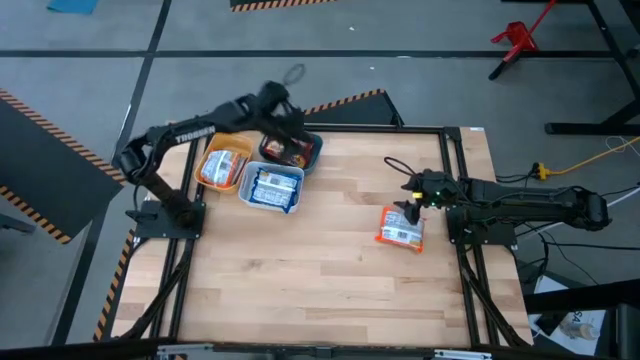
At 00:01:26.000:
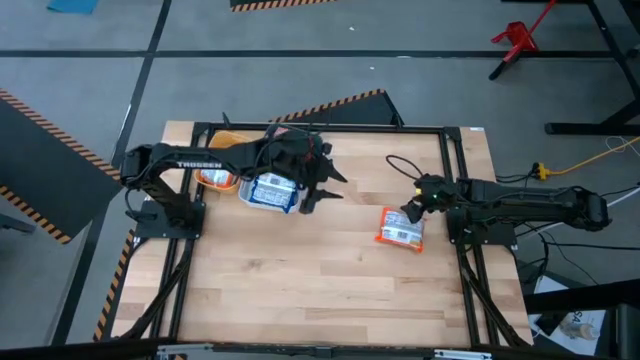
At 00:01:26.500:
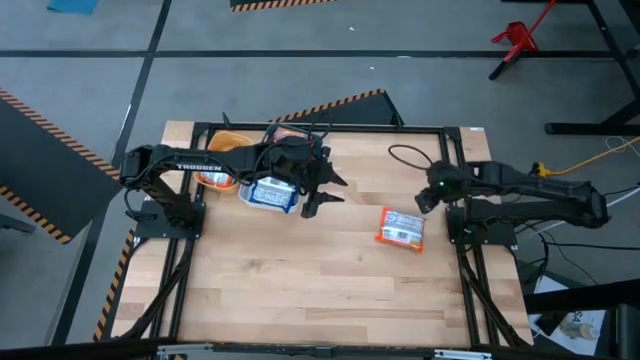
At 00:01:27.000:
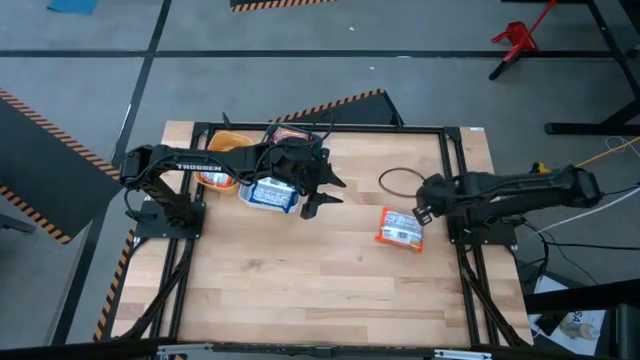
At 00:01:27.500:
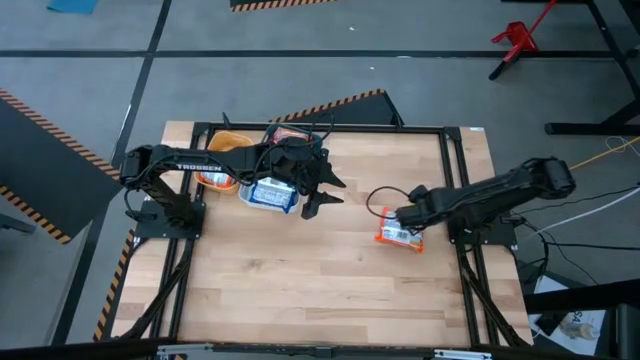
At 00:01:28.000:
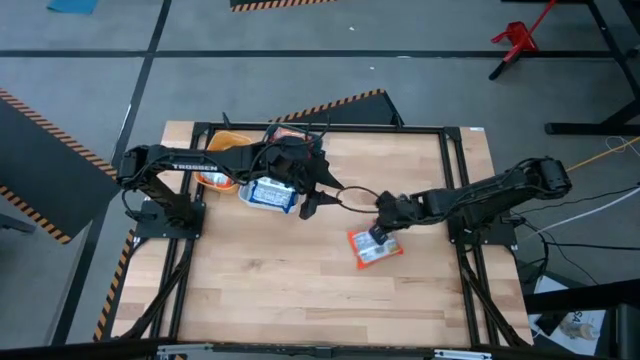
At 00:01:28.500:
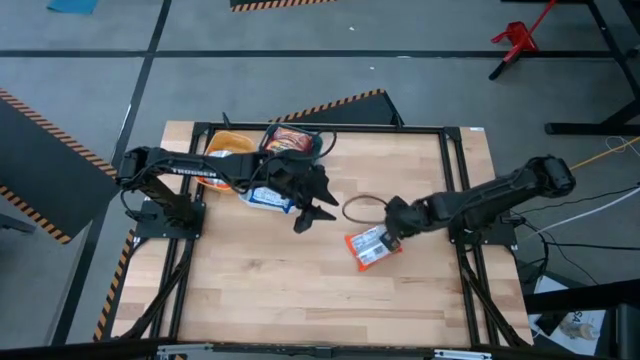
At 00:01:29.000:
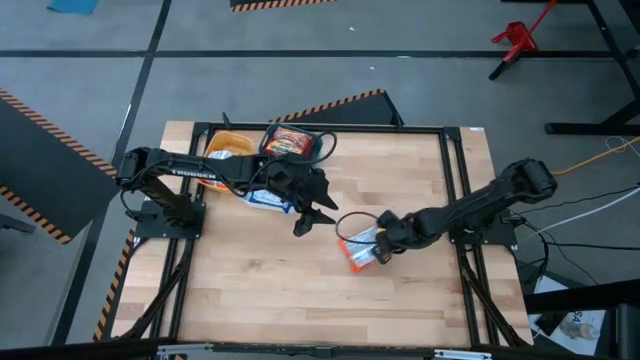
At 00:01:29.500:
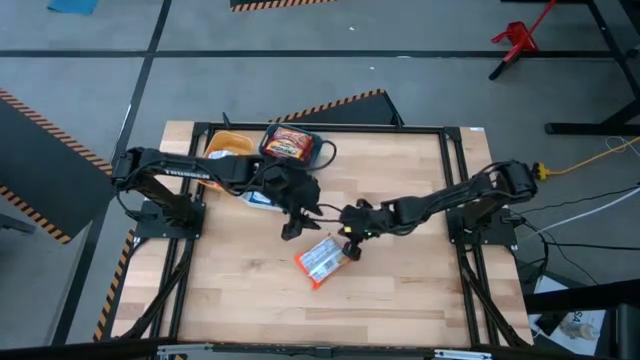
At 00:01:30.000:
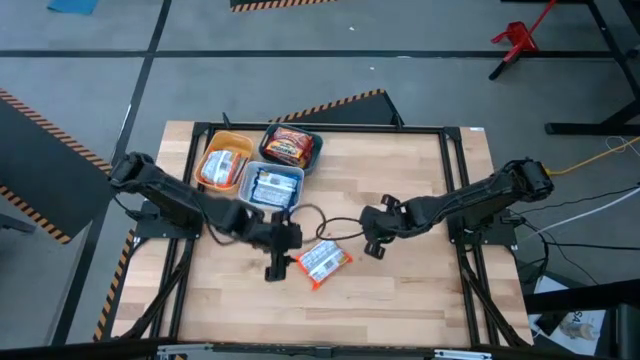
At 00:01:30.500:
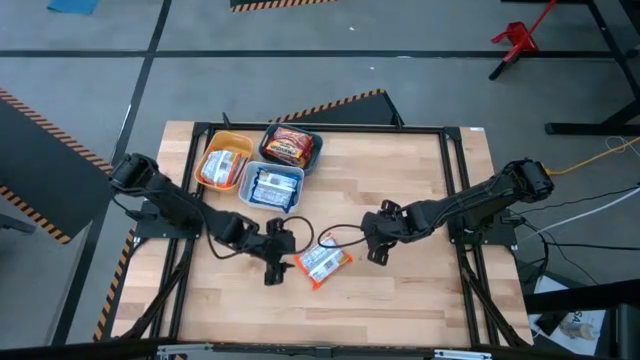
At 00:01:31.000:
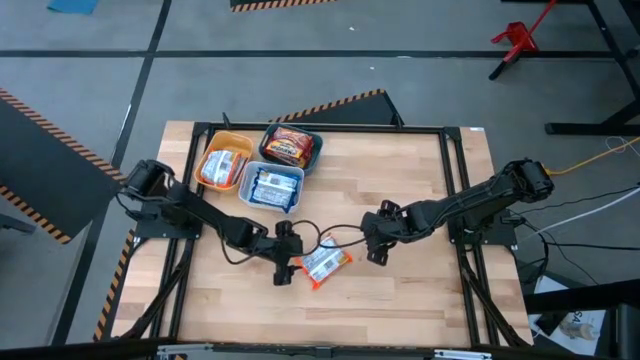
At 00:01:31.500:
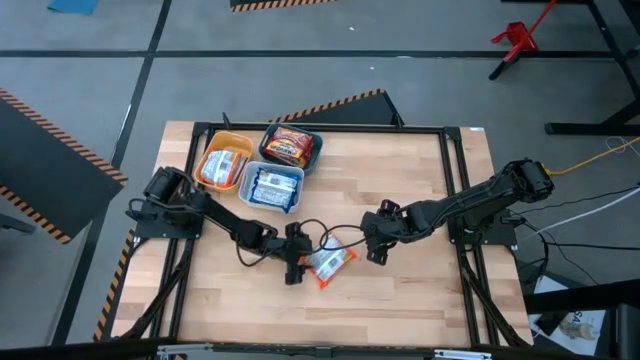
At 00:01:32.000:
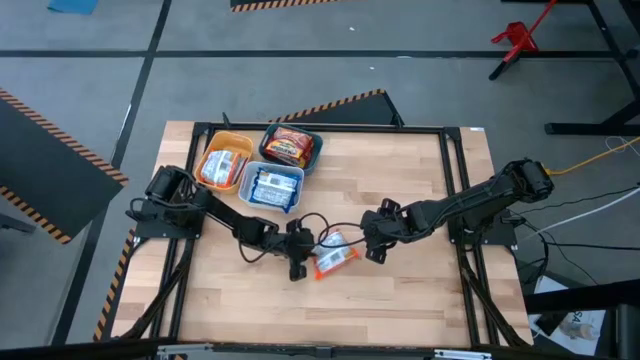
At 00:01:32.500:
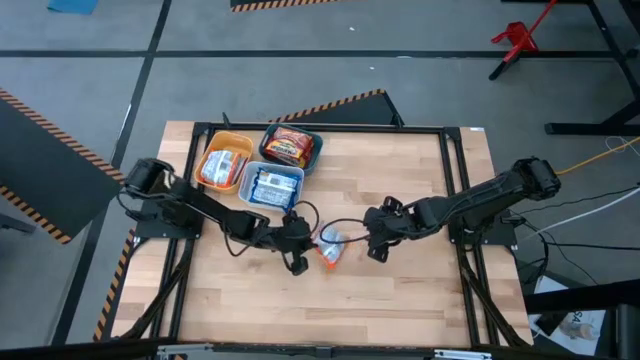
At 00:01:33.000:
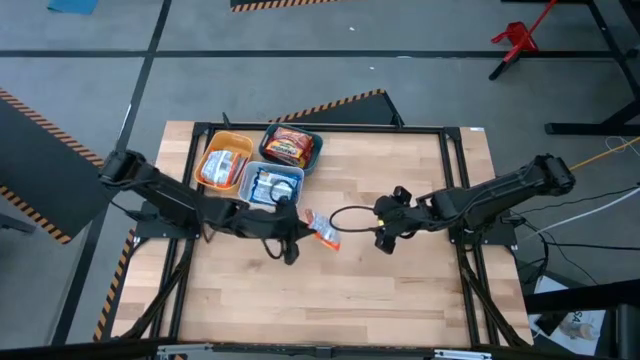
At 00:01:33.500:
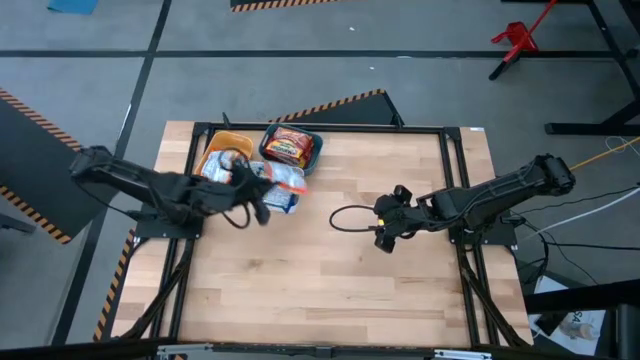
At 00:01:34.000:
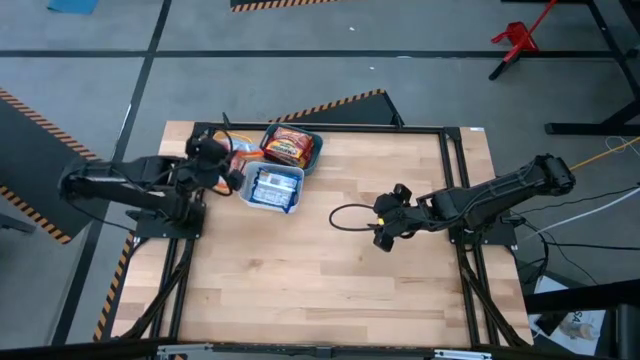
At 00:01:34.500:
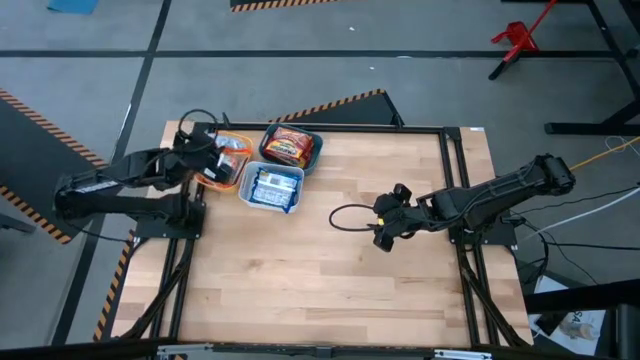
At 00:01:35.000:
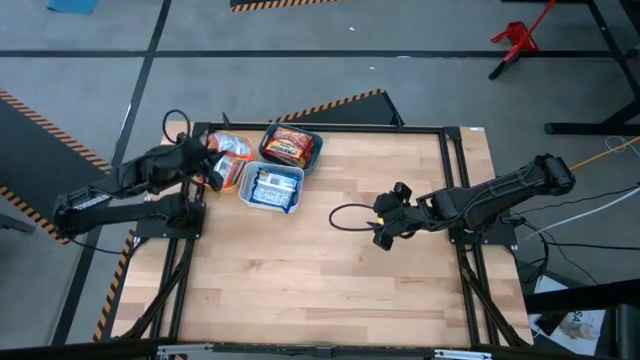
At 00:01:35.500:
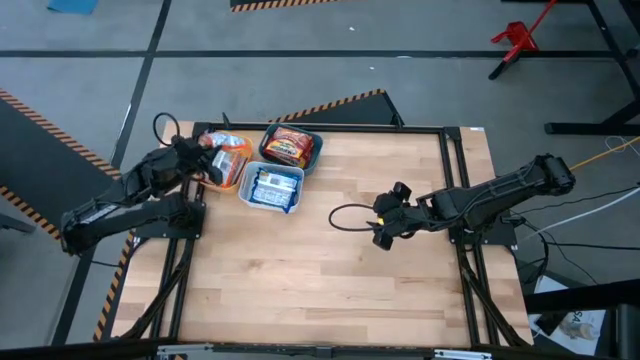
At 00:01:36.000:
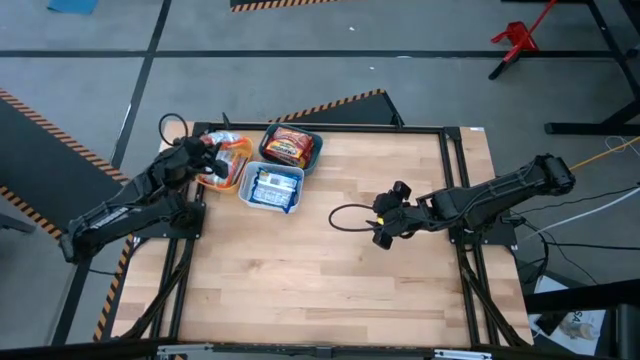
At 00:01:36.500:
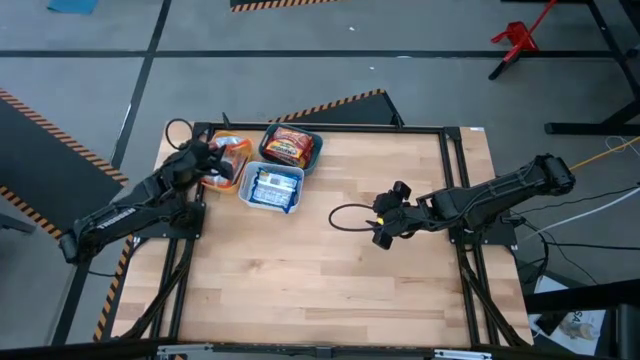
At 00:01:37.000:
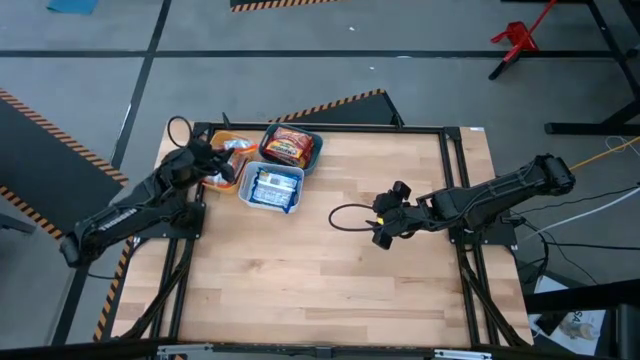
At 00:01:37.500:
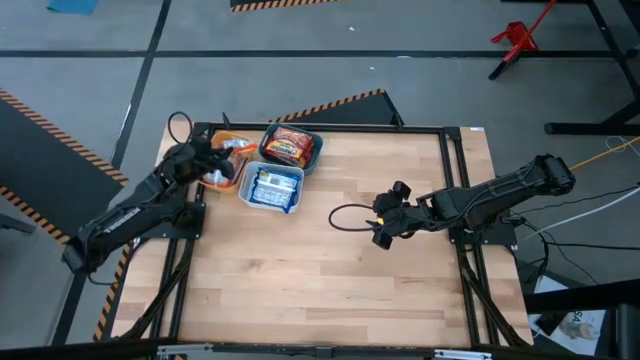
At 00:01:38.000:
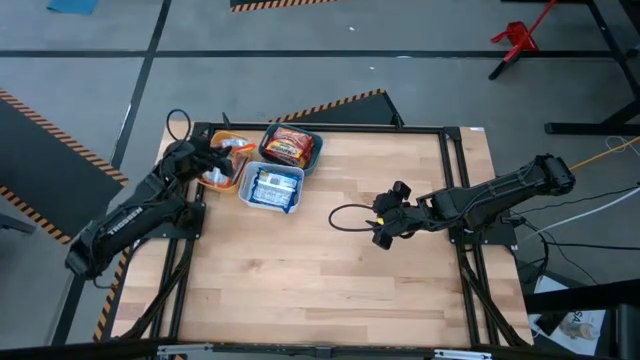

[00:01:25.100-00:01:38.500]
Task: Sort Maruchan noodles
Put the orange noodle into the yellow bin

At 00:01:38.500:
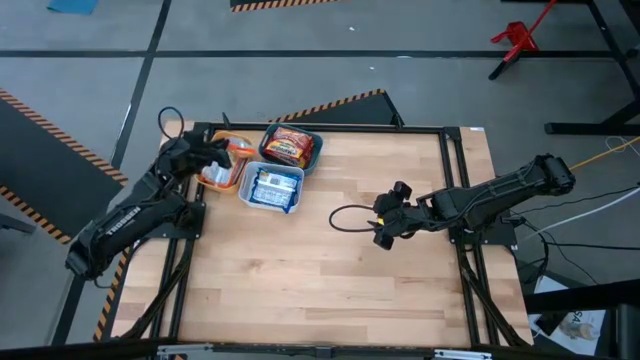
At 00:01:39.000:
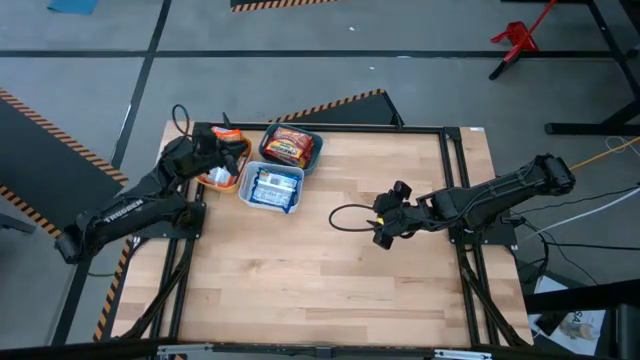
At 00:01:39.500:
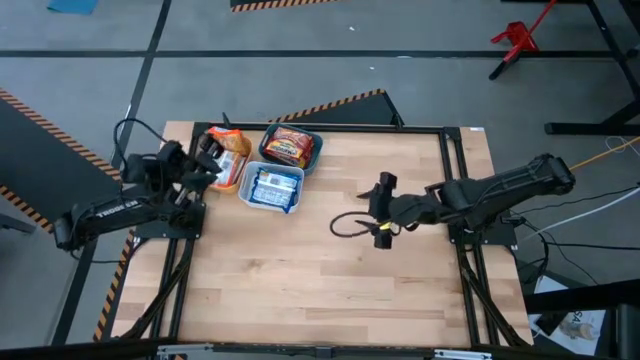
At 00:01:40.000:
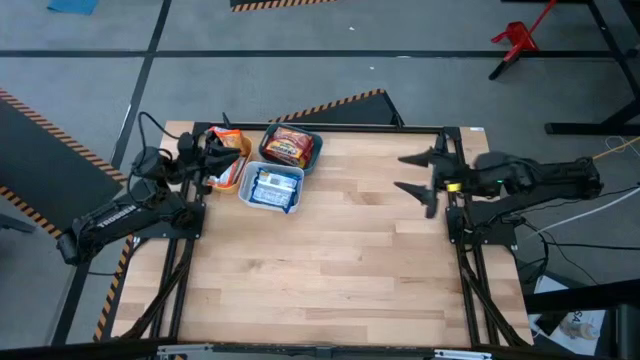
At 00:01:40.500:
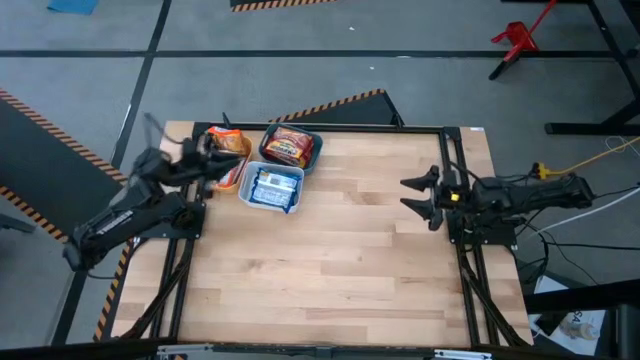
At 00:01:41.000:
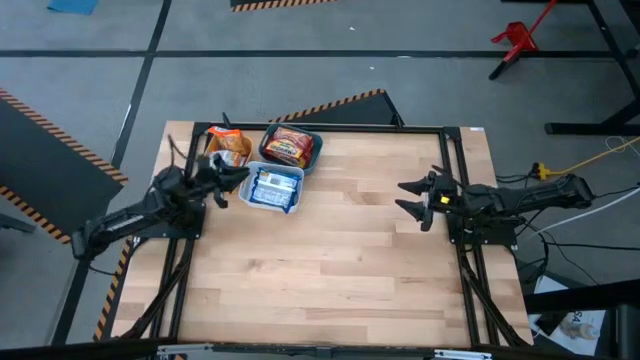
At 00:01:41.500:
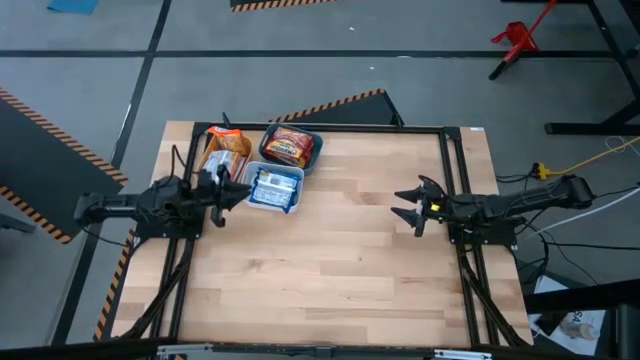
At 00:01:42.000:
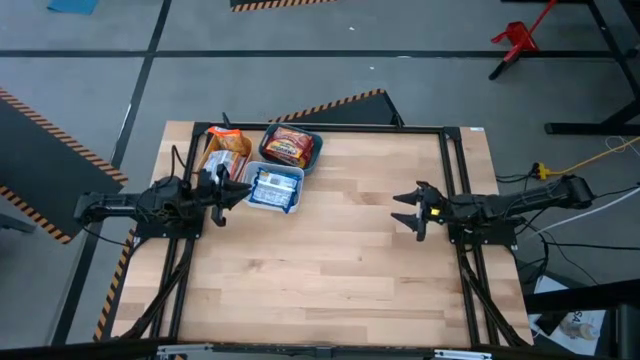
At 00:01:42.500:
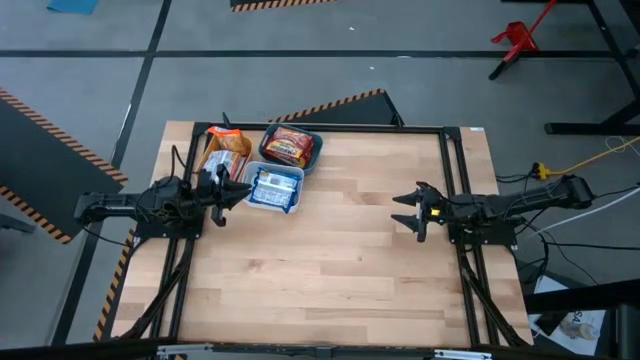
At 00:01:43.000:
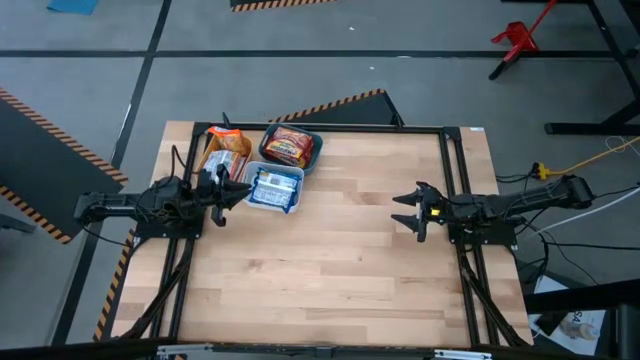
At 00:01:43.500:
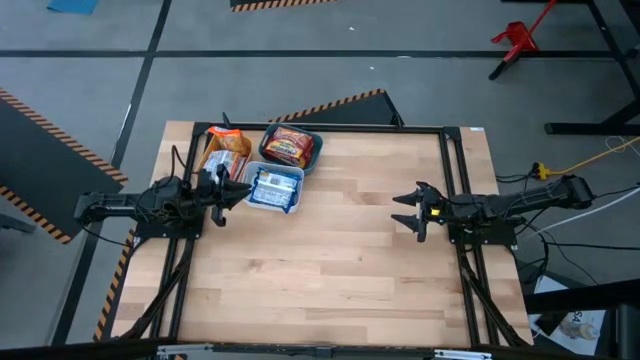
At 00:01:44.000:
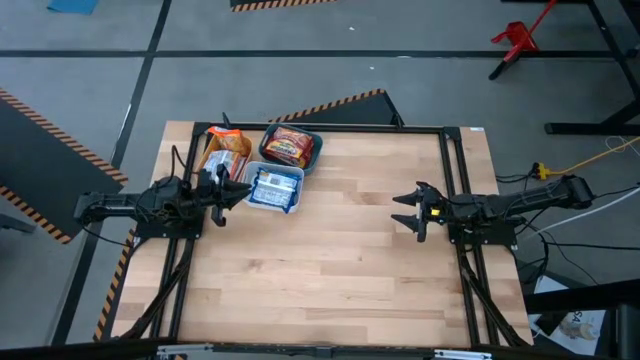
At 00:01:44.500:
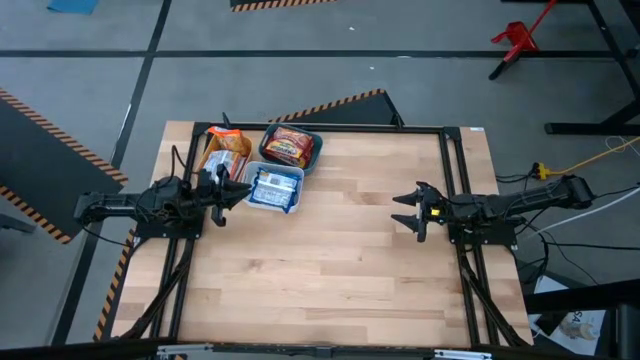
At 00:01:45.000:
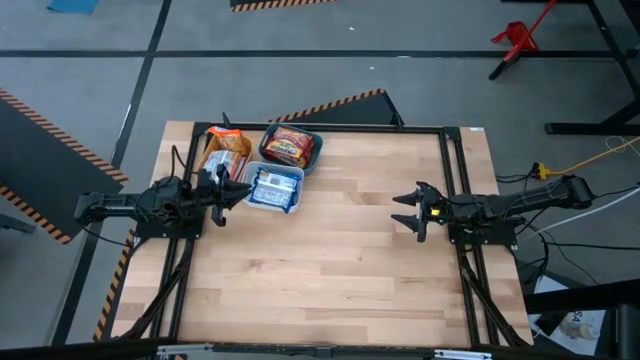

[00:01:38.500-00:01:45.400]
Return to Home Position

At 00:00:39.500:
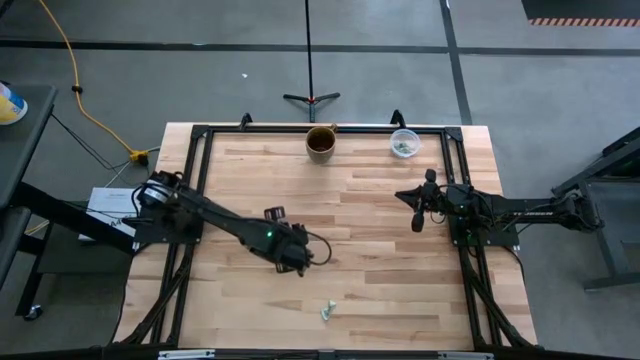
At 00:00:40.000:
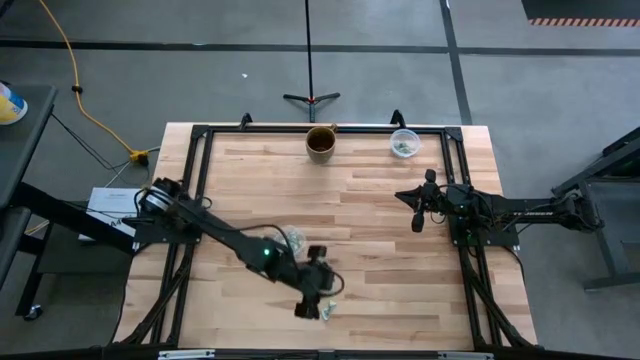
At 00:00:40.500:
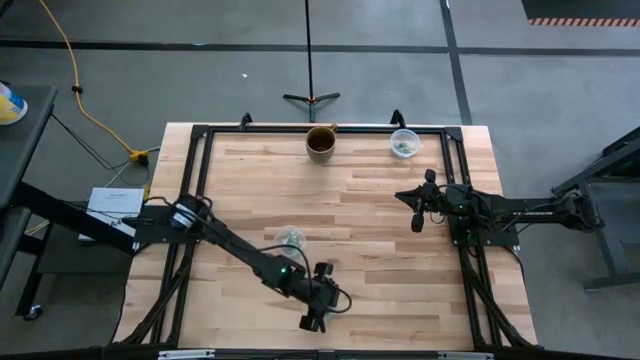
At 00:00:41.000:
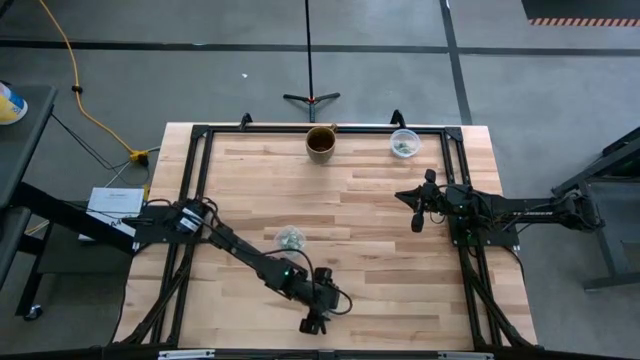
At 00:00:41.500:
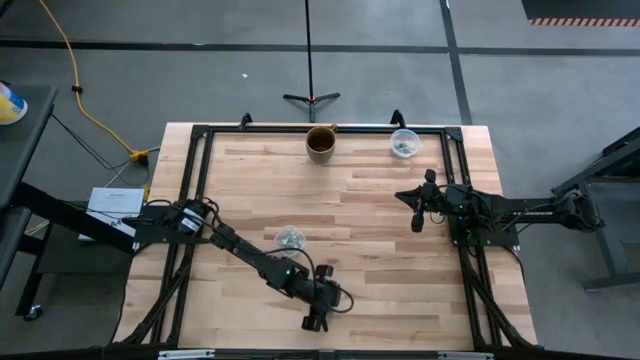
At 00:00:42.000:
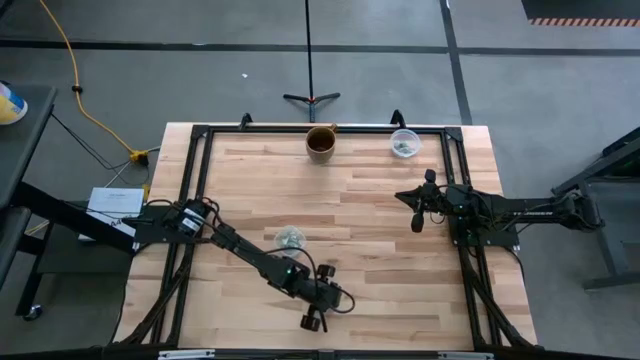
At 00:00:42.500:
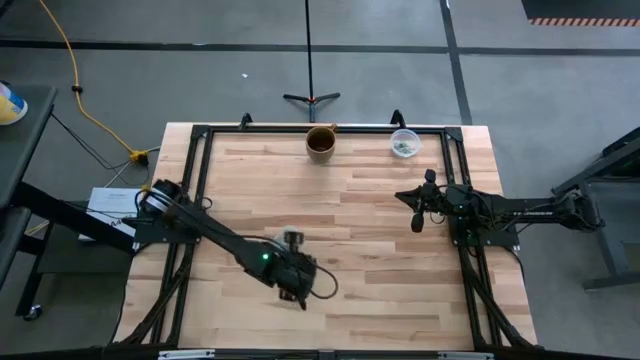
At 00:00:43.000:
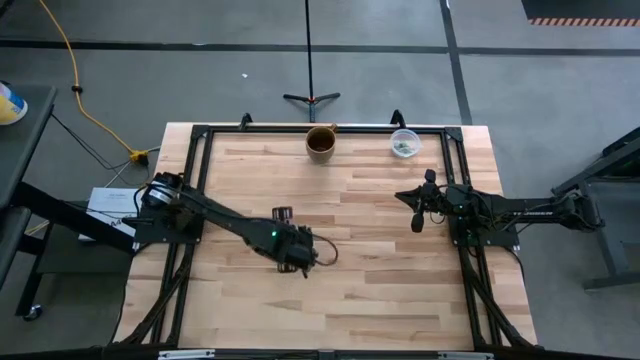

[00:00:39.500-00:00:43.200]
Task: Pick and place items into bin
Put the stevia packet into the bottom transparent bin
